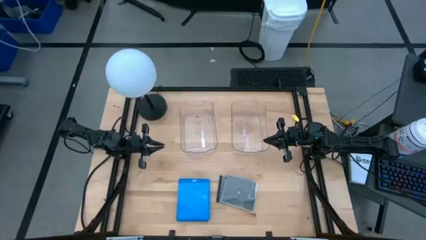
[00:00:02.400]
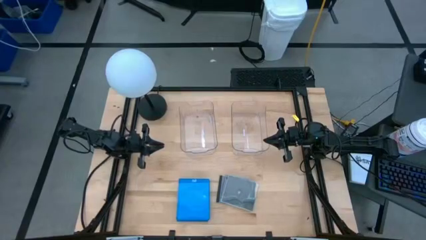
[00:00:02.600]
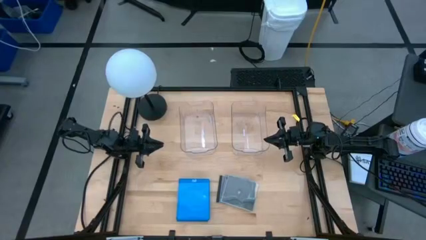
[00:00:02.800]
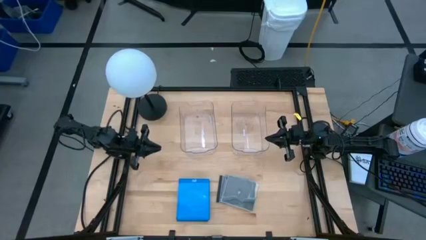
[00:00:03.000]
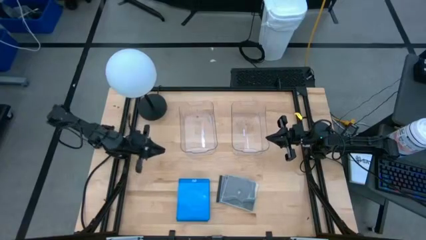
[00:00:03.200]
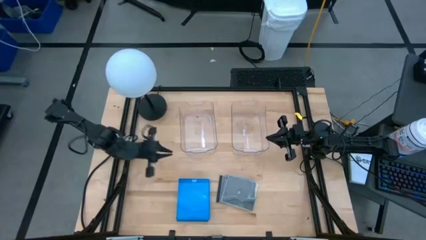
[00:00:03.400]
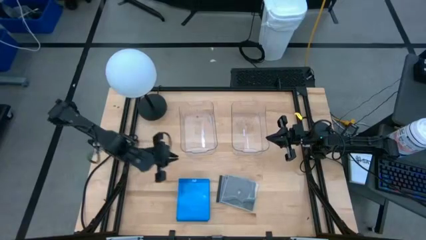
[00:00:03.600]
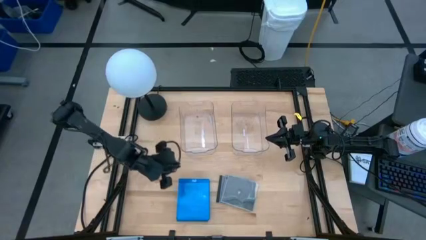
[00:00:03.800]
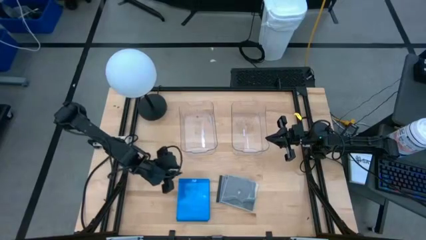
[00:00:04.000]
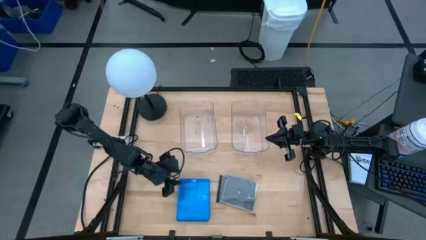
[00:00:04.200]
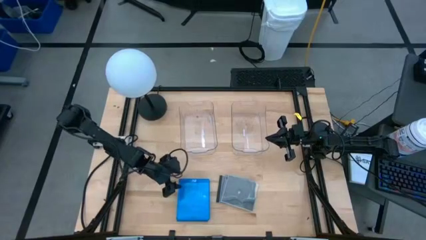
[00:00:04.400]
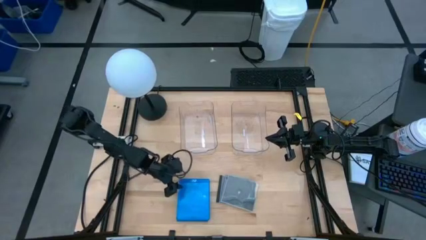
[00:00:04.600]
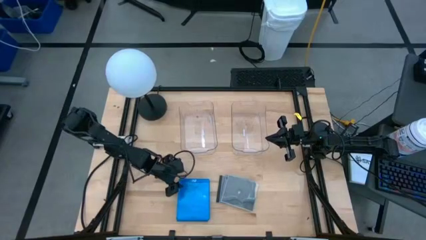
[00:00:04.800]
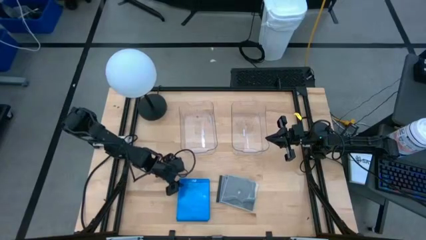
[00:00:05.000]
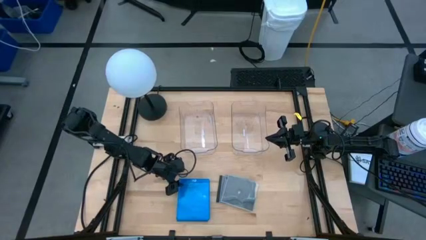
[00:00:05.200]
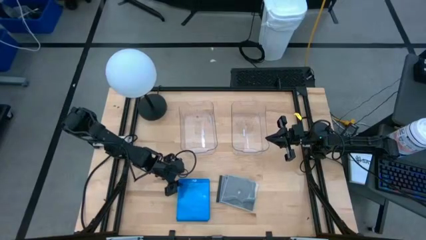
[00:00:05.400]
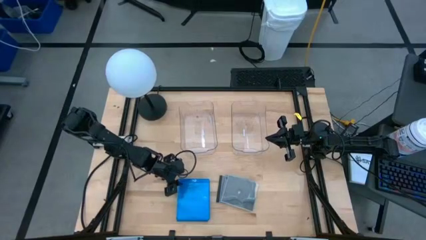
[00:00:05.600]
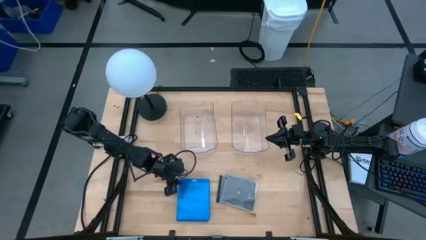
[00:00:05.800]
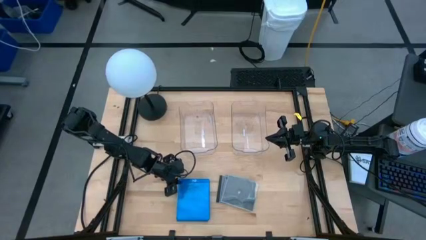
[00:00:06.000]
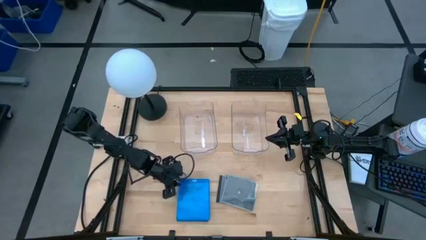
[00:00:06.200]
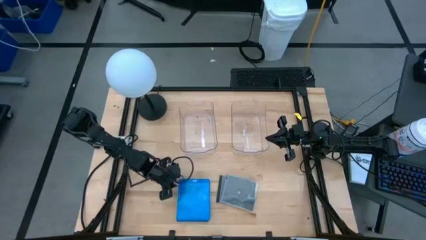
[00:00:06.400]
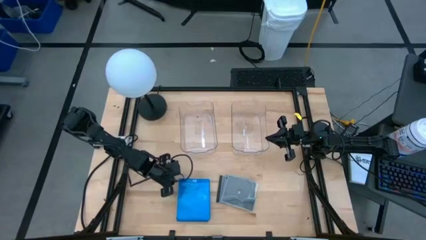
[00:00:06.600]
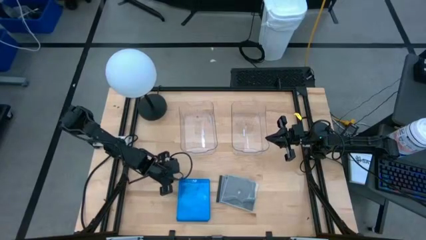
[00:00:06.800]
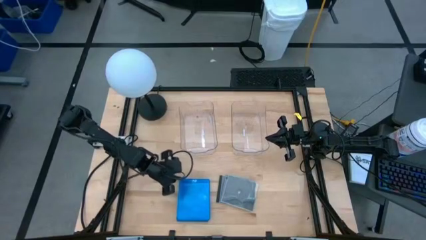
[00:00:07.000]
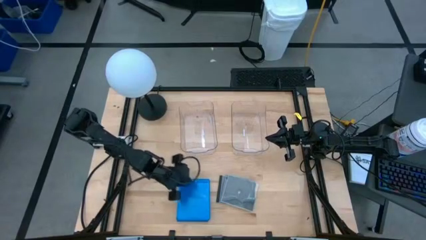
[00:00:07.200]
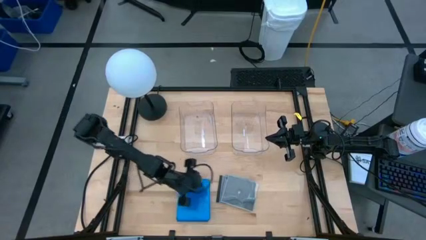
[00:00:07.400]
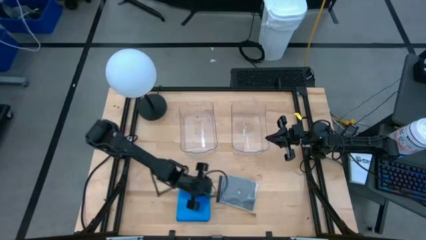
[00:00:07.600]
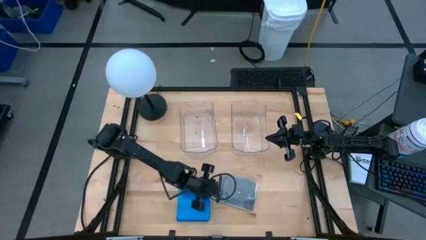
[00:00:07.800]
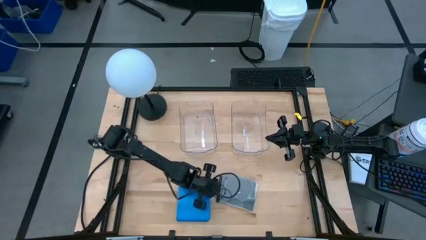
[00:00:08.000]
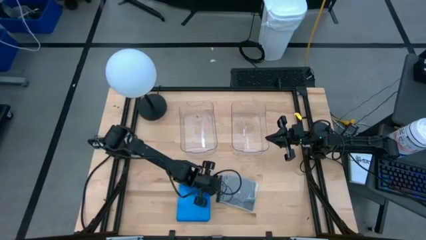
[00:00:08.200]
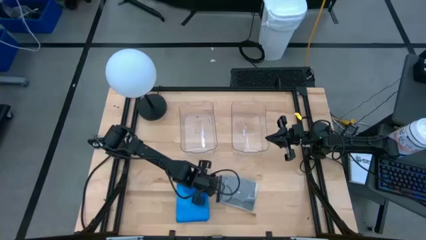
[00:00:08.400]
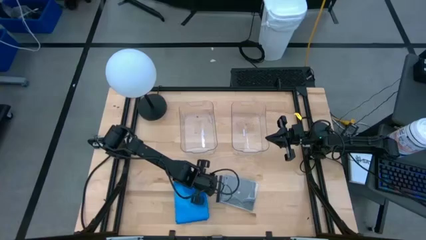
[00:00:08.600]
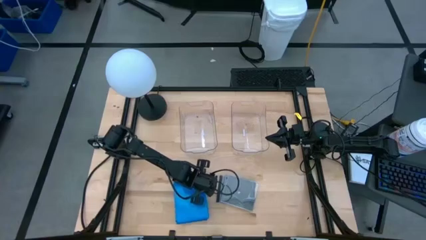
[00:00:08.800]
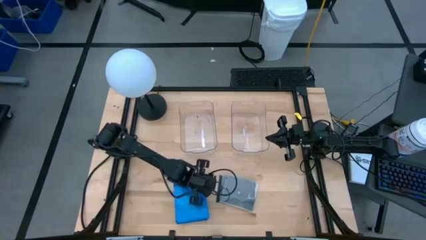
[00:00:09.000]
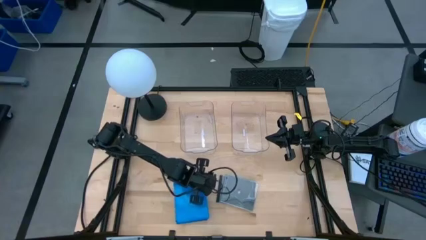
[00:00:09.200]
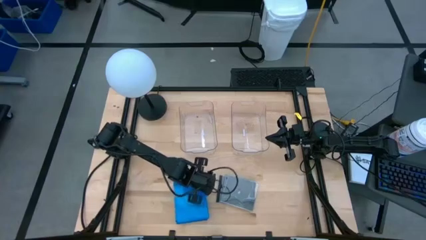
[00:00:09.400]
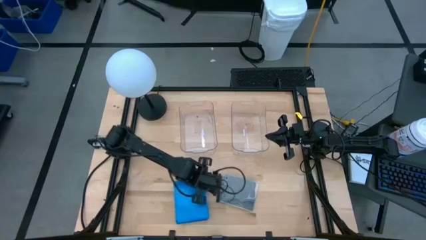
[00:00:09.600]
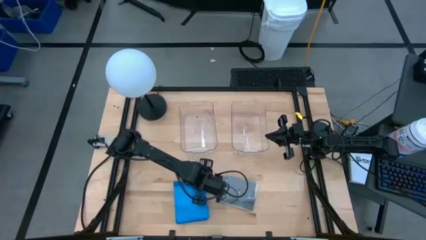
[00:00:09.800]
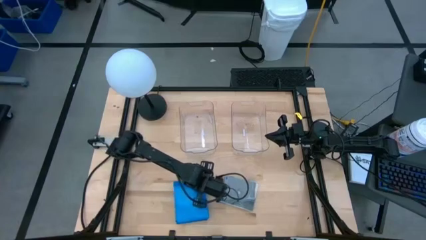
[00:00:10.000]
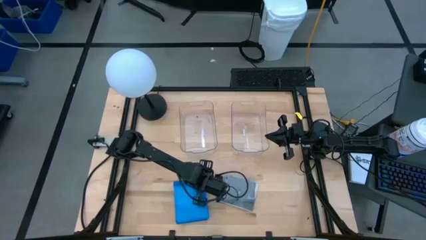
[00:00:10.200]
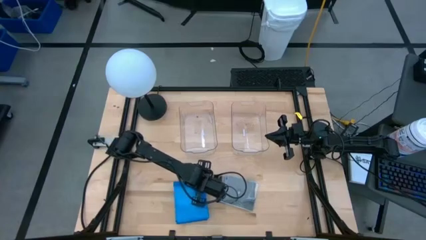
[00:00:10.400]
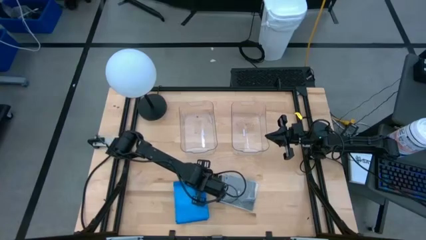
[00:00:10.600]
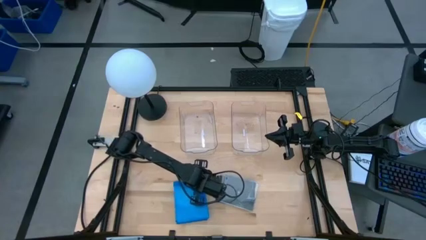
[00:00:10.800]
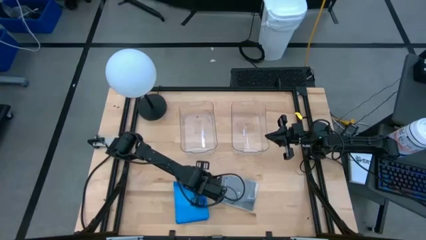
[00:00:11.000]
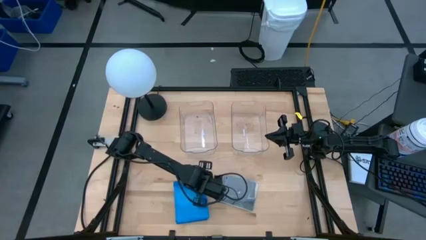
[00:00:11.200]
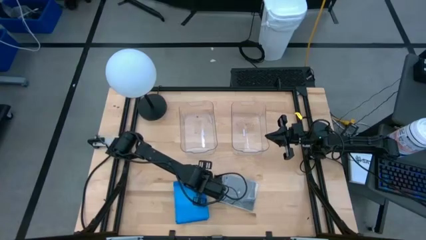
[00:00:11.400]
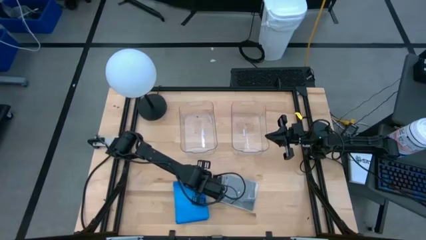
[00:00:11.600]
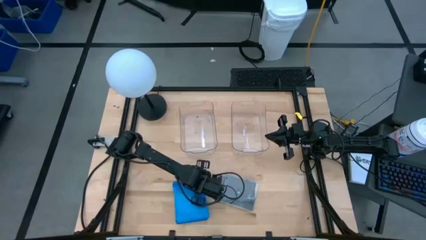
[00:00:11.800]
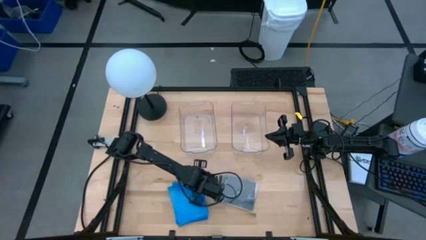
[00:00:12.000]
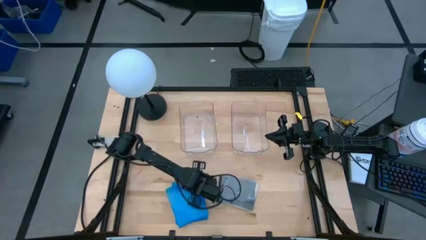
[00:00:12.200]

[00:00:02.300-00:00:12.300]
Task: Pick & place jewel cases by type
Put the blue cd case into the left transparent bin

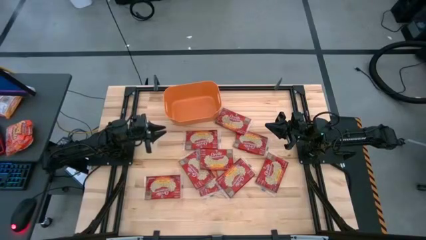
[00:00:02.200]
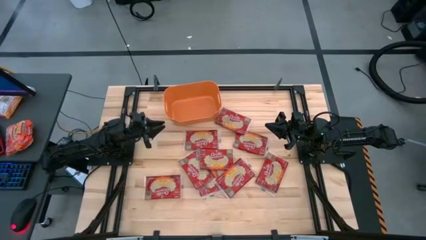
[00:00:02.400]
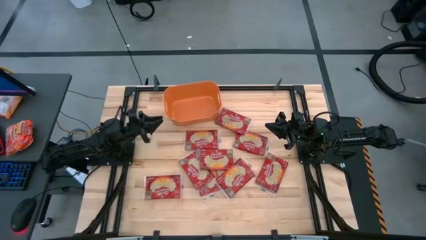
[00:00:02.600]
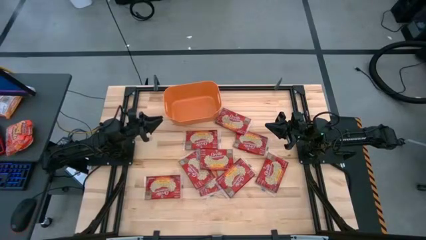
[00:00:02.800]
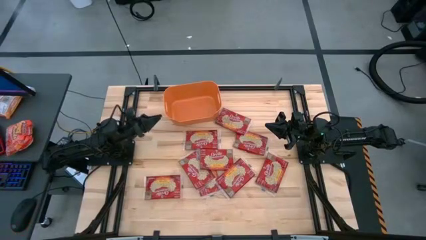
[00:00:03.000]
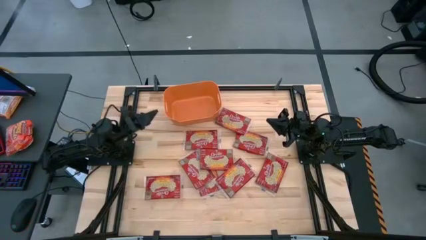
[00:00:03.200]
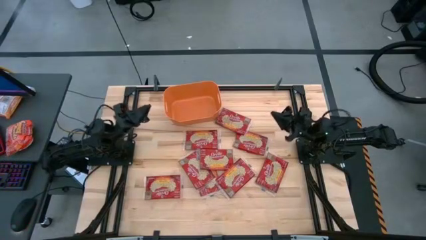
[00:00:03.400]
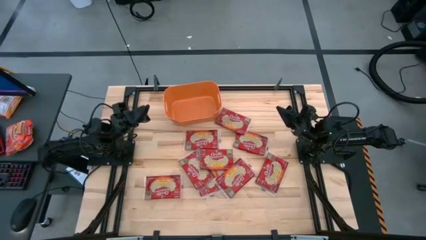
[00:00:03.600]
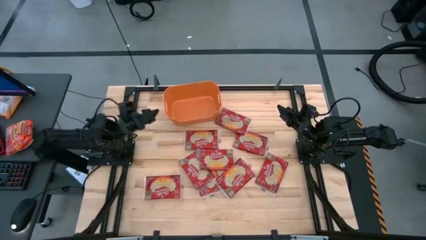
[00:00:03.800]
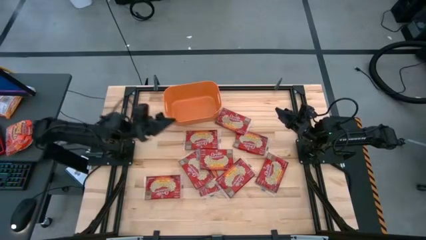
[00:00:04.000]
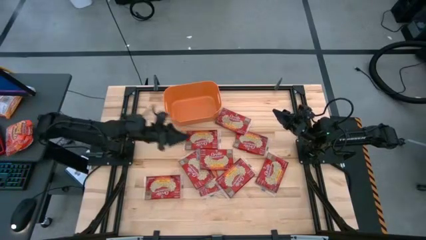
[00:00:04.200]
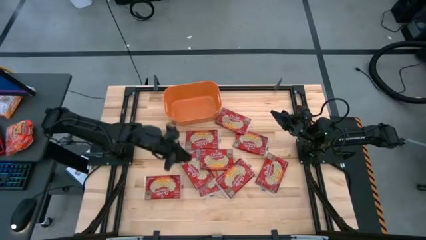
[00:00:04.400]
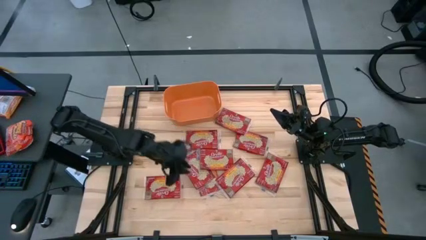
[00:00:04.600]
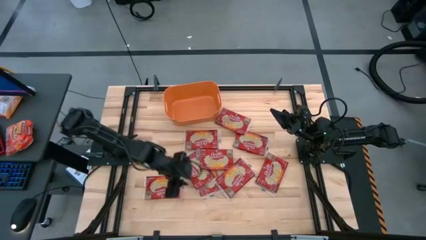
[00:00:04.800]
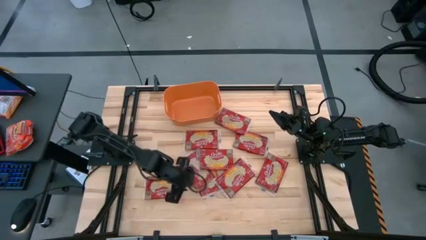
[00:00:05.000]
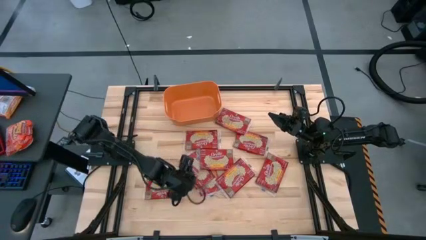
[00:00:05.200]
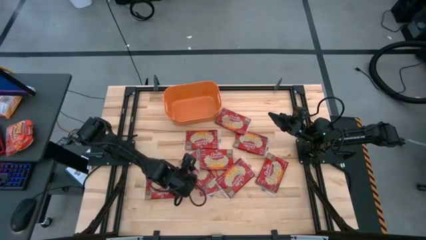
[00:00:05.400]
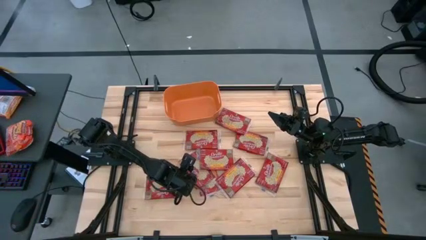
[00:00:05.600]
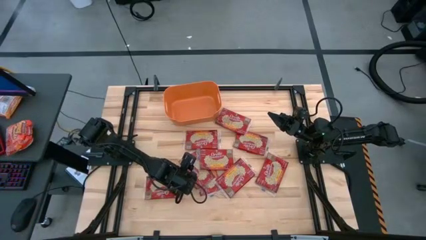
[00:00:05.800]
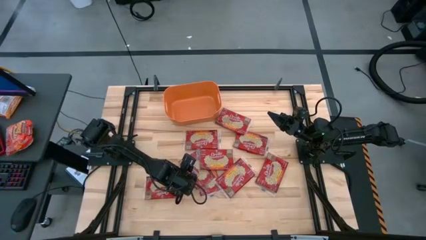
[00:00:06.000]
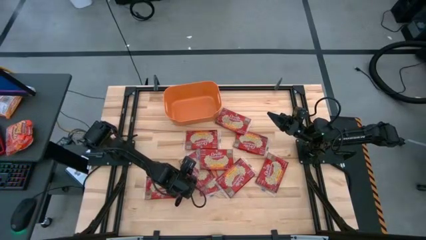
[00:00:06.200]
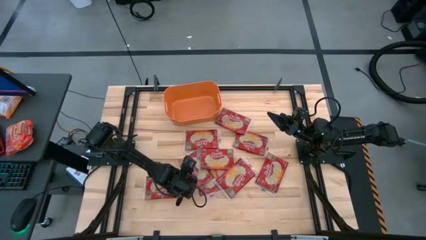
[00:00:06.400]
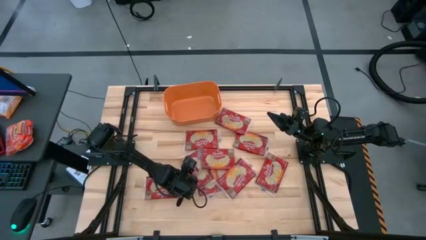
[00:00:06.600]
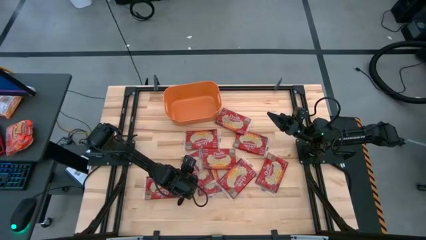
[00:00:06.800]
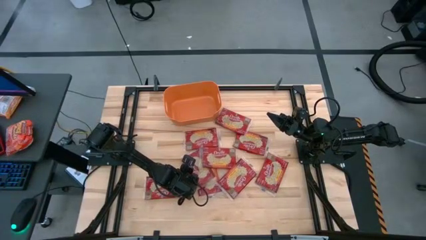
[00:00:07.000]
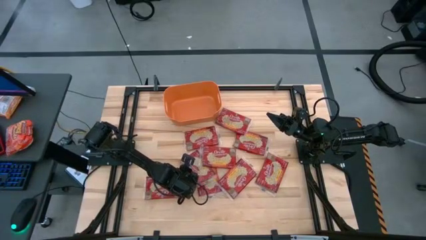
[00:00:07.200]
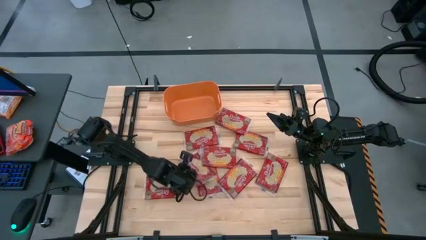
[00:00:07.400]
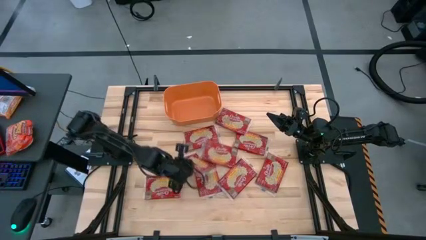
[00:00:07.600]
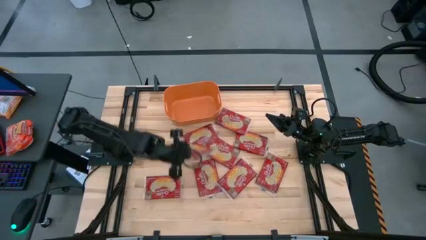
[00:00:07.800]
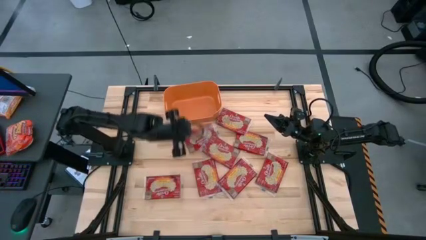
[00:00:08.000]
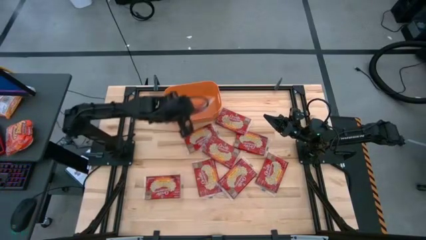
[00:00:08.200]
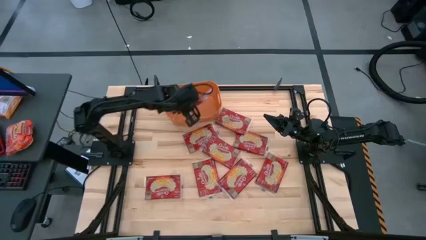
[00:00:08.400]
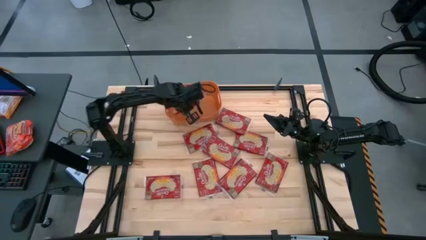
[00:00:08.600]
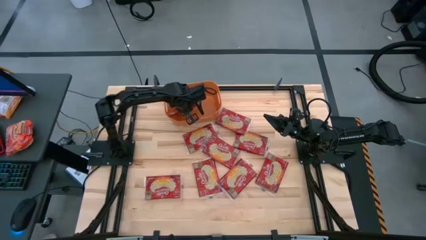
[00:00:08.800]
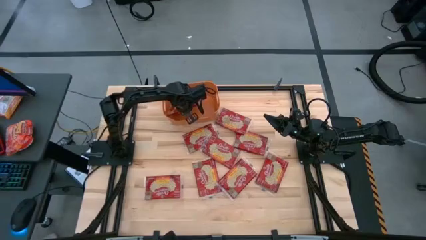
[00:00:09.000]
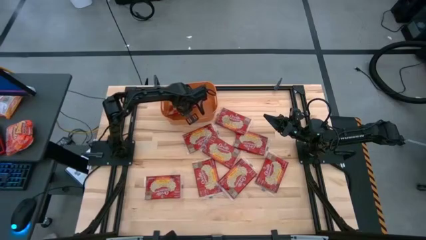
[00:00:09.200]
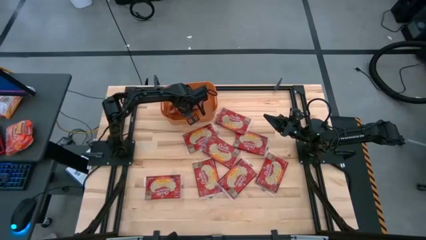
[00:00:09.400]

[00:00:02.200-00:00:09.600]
Task: Sort popcorn bags into baskets
Put the red popcorn bag into the orange bin
